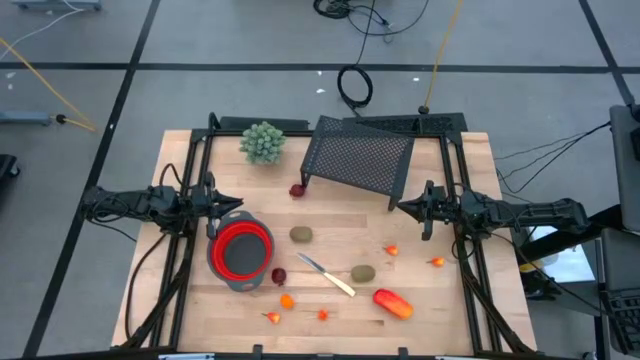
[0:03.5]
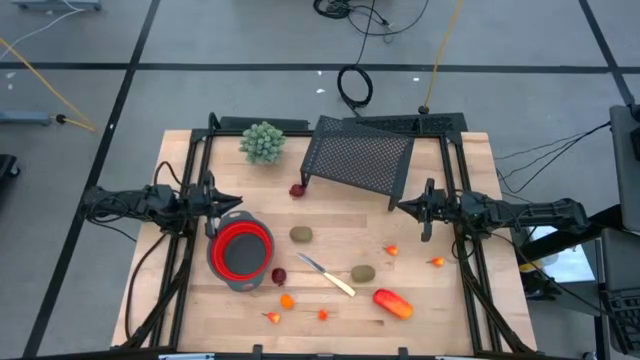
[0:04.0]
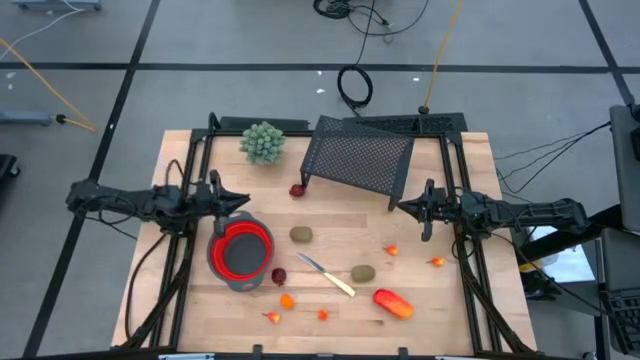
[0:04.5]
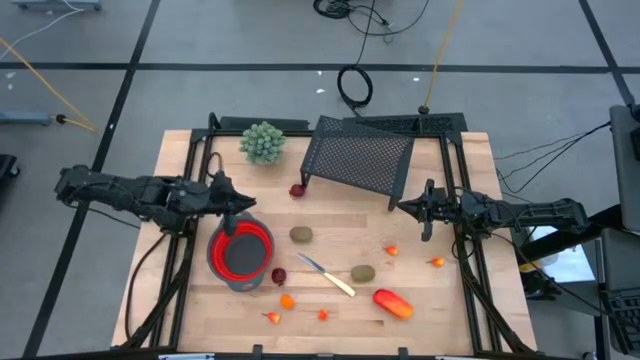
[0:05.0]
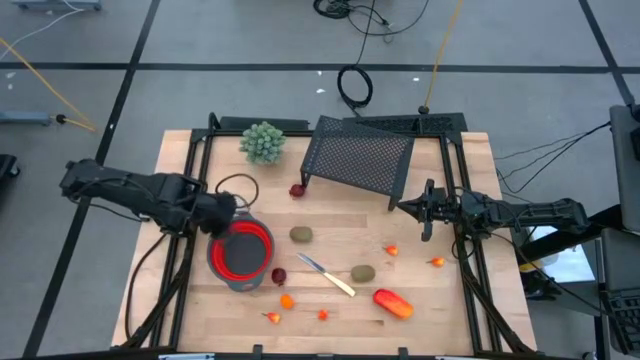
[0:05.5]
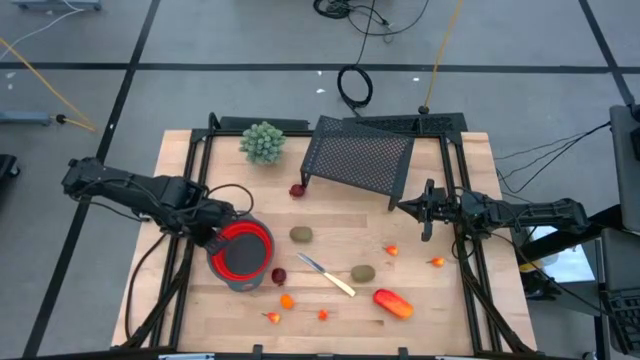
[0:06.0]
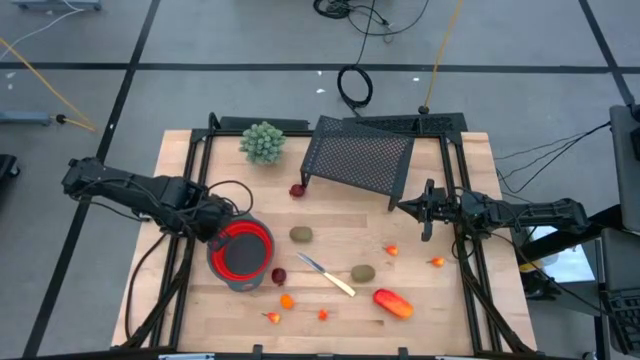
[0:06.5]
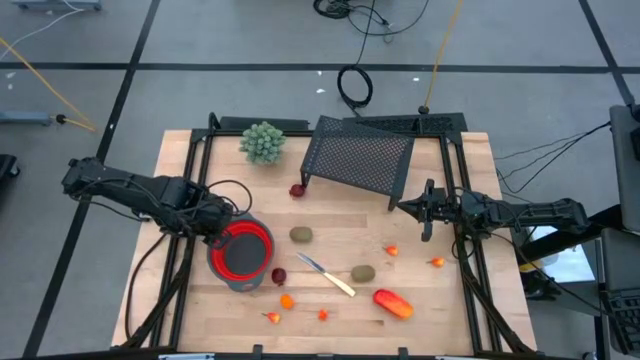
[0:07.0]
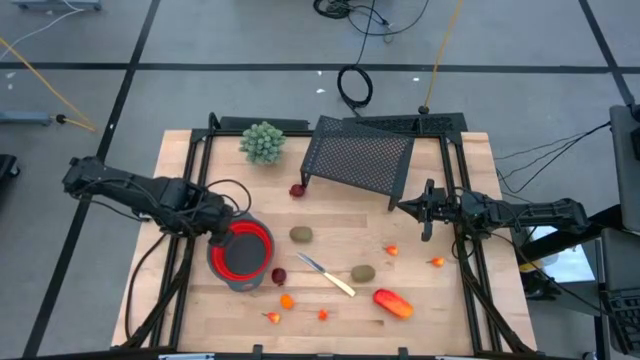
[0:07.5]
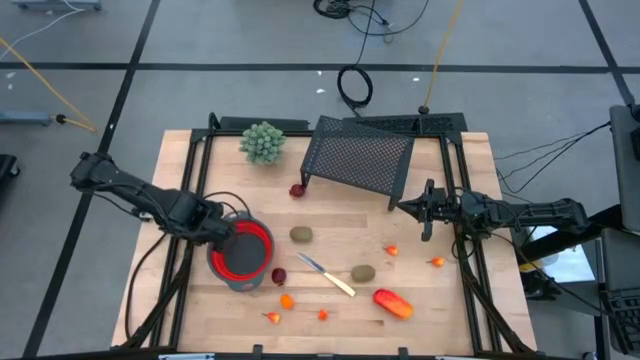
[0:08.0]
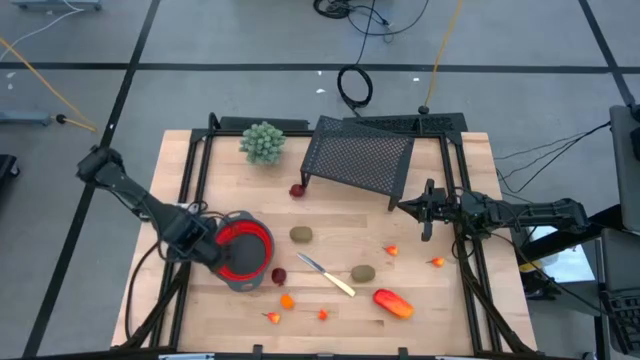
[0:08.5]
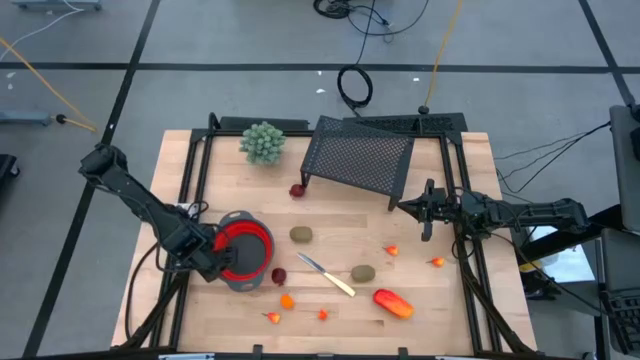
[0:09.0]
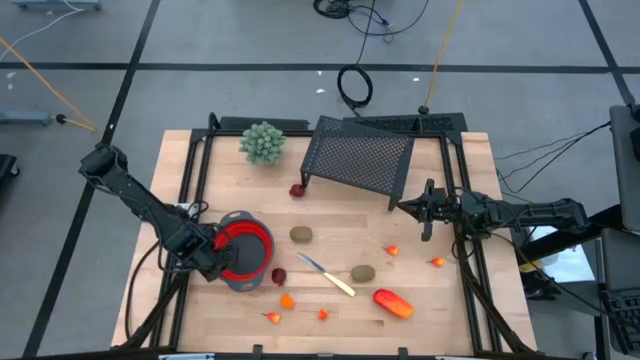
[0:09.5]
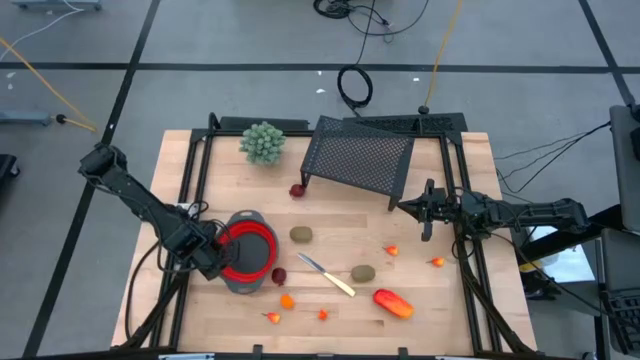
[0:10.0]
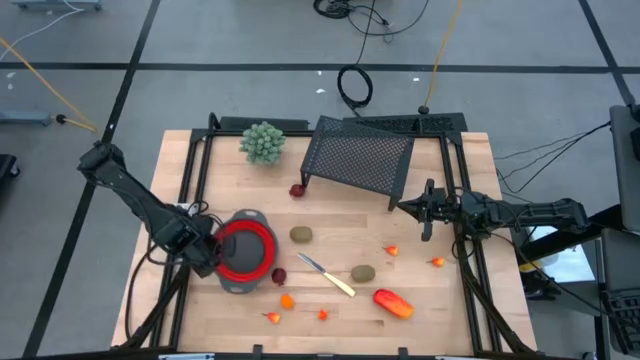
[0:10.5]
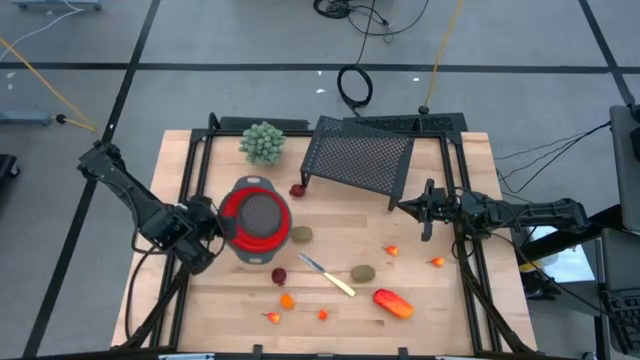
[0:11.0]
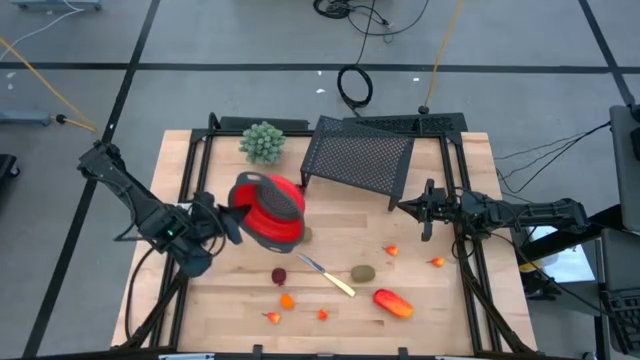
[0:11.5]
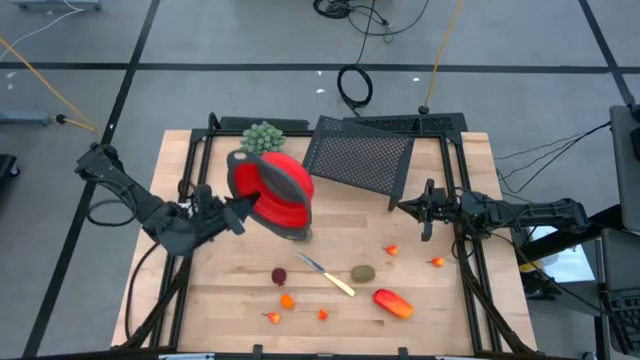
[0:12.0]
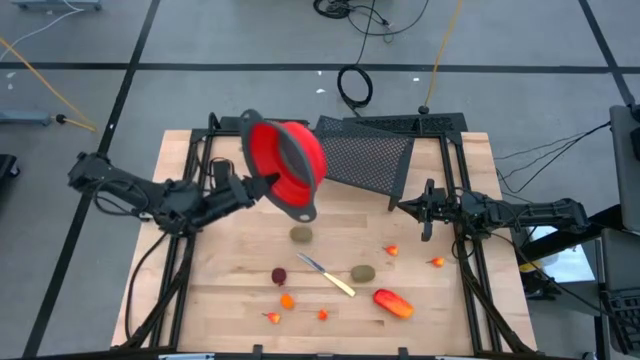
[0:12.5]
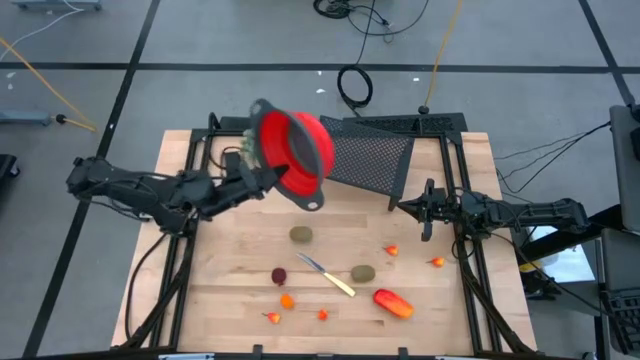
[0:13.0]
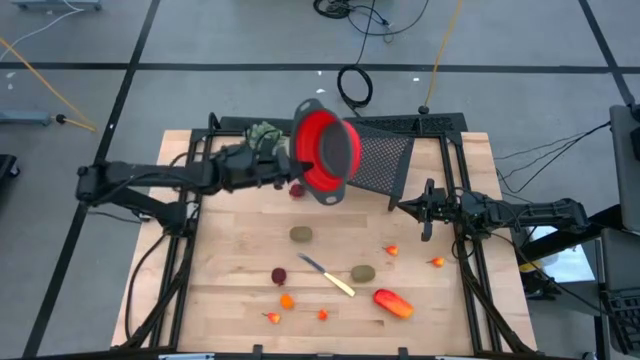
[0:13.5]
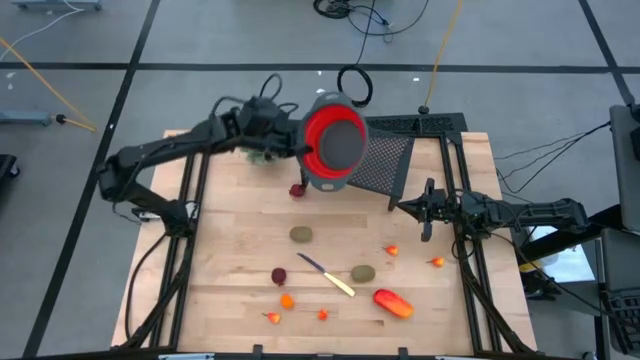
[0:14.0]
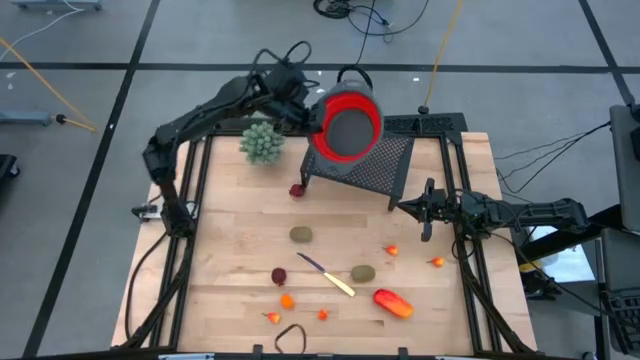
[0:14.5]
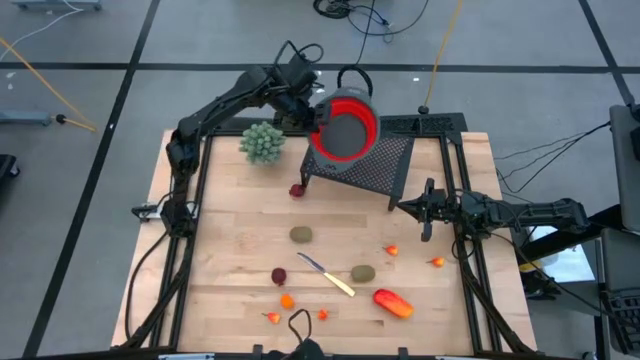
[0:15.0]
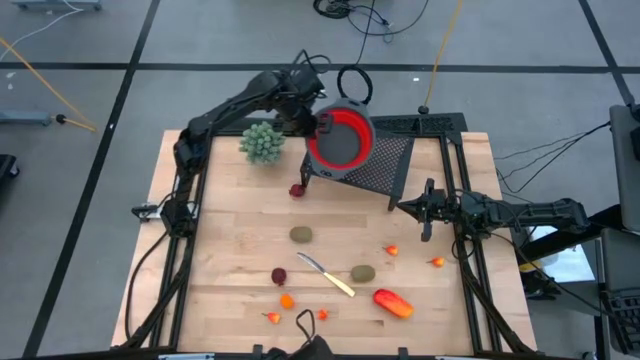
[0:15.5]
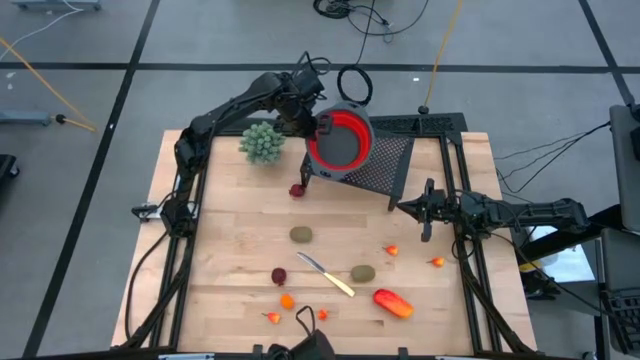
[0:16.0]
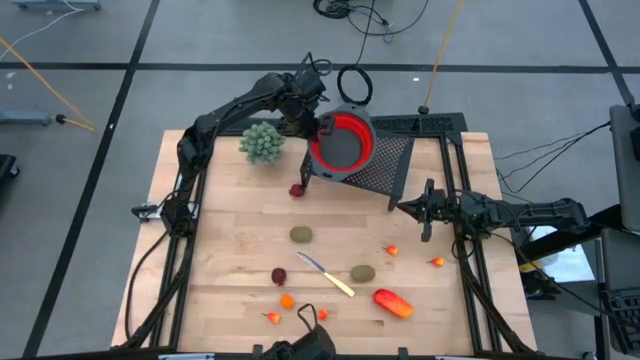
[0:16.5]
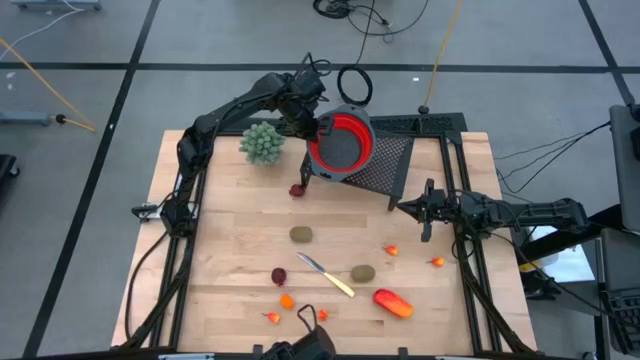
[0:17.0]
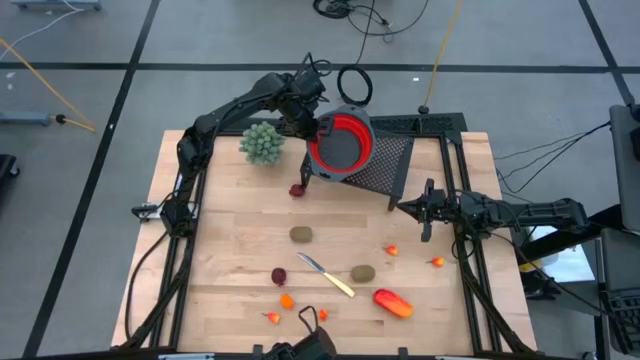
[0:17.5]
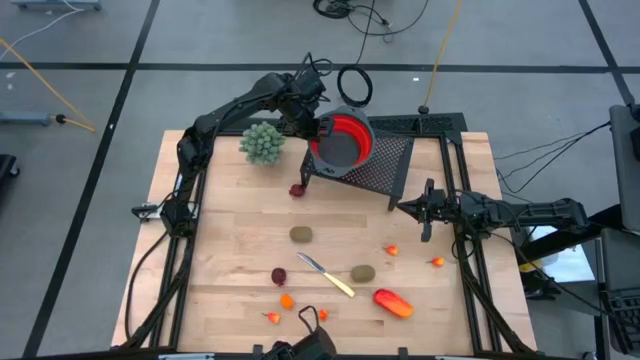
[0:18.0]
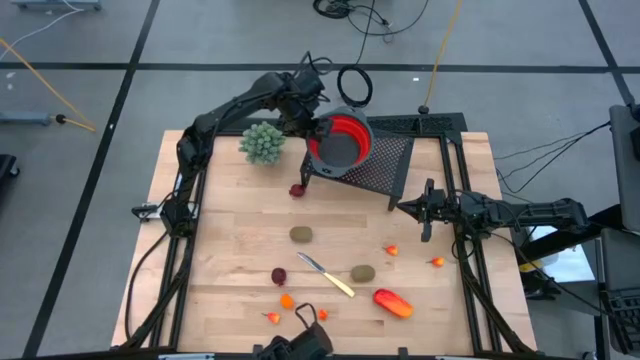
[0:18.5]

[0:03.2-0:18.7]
Task: Pick & Place Fruit
Put the red strainer bowl on the shelf

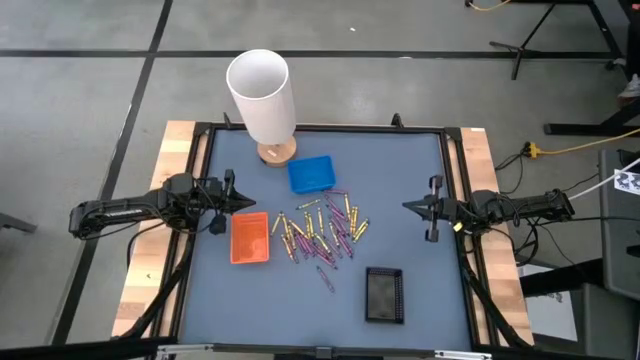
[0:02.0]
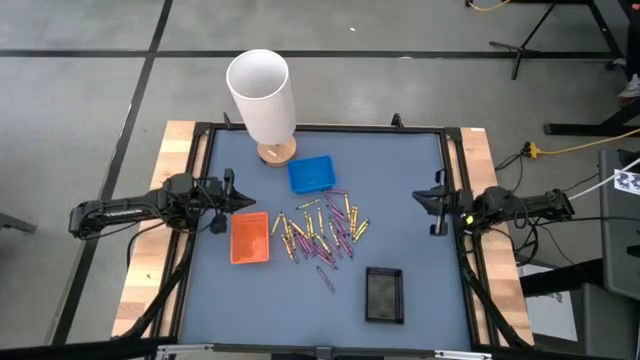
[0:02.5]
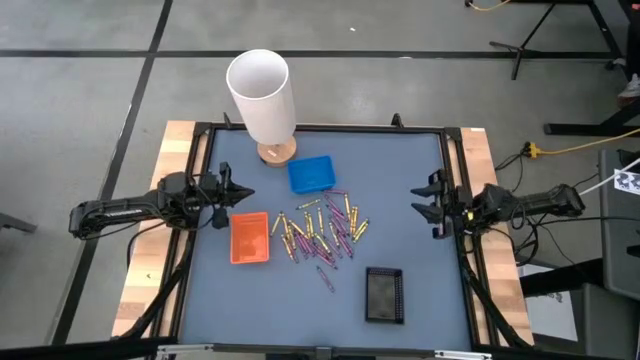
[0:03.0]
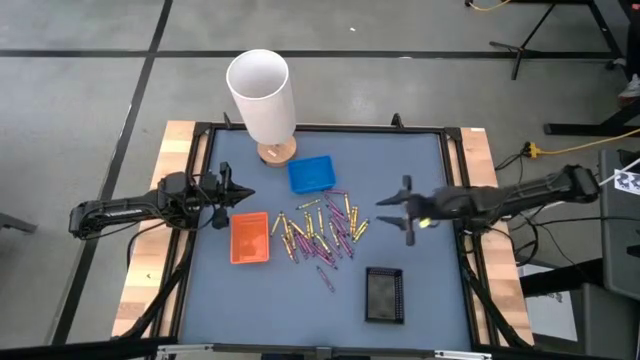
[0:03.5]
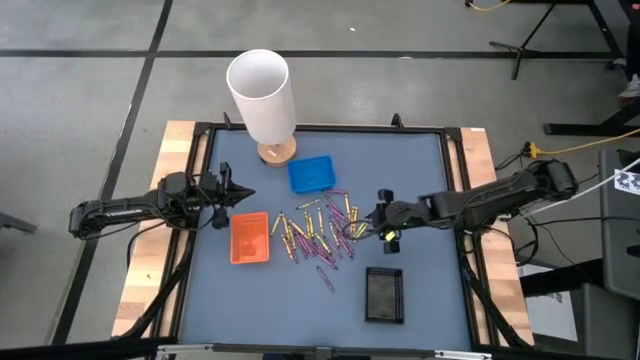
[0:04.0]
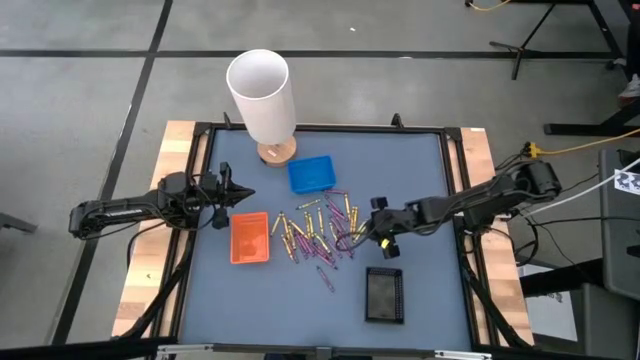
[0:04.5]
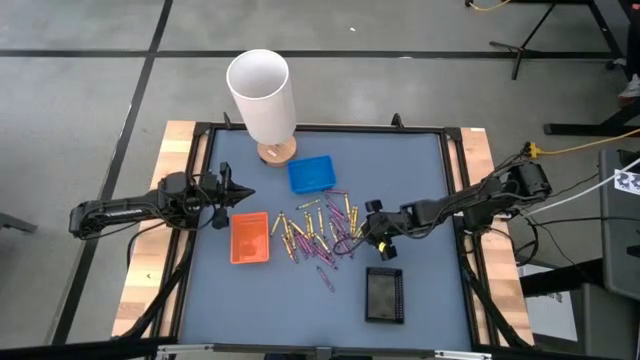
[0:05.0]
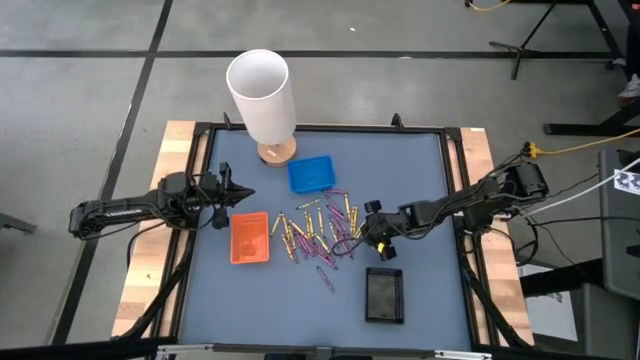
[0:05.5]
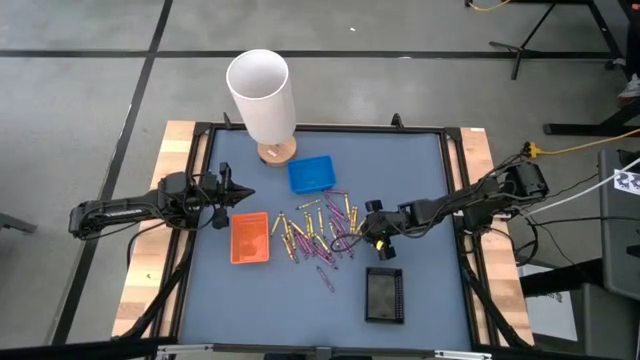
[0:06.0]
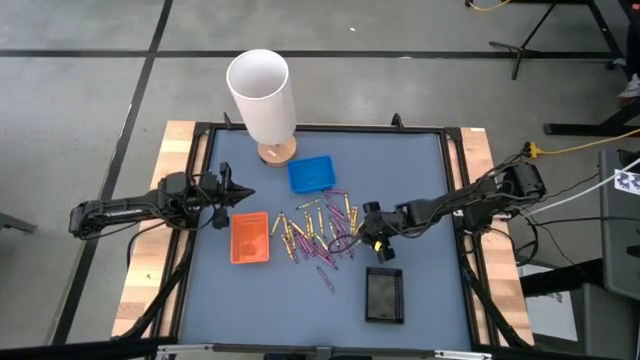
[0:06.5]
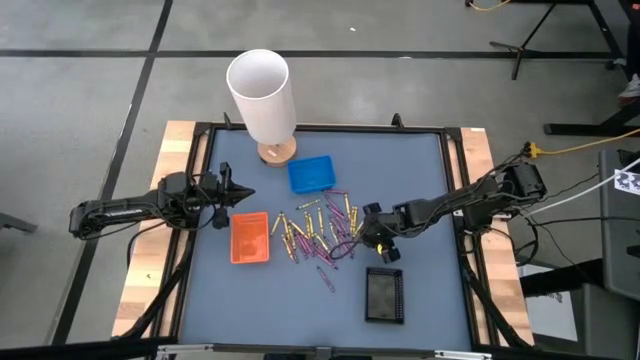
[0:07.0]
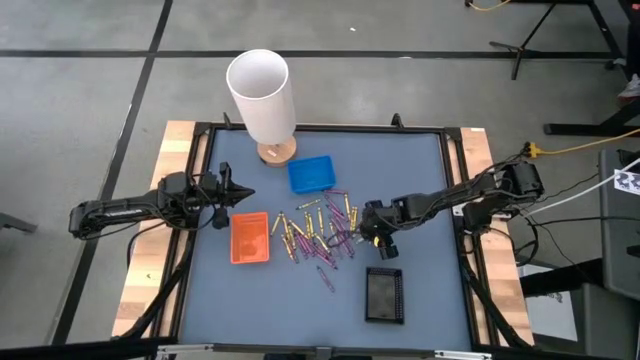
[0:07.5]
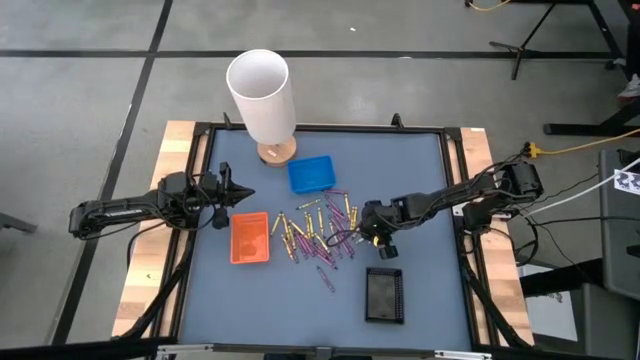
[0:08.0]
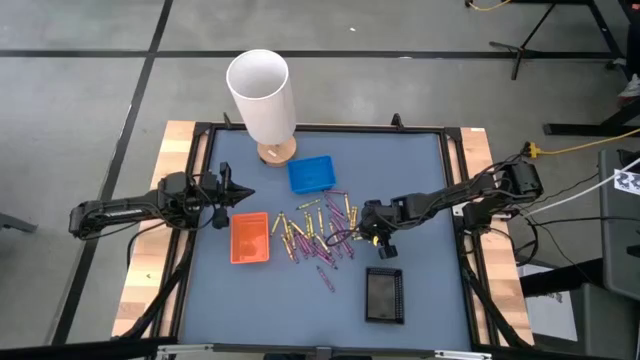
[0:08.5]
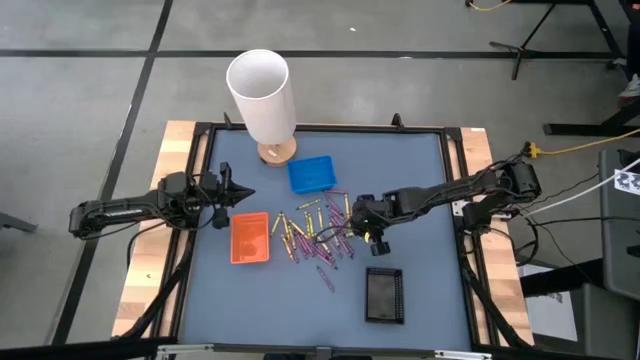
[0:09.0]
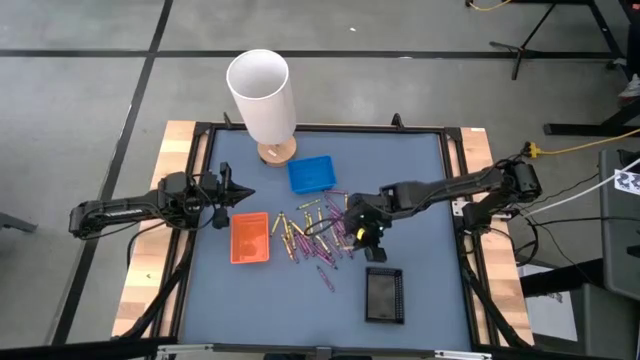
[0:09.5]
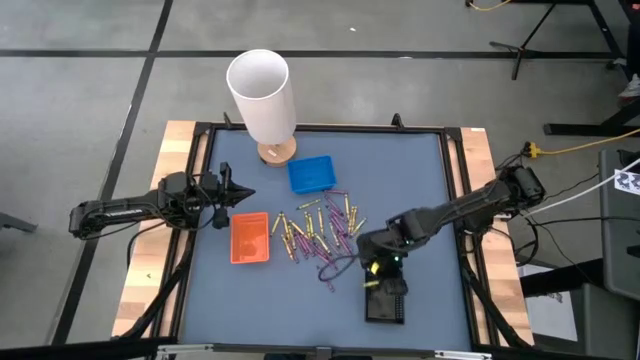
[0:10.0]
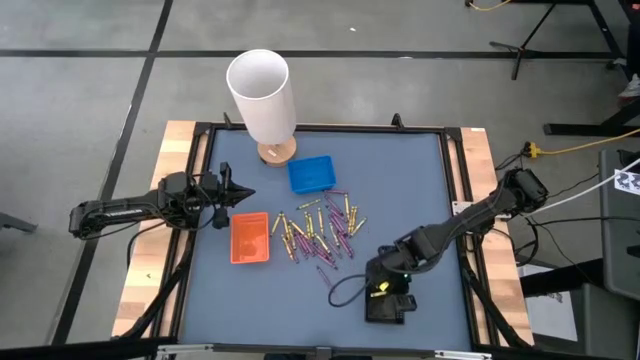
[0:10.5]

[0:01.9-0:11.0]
Task: Sort crayons
Put the green crayon into the black bin
